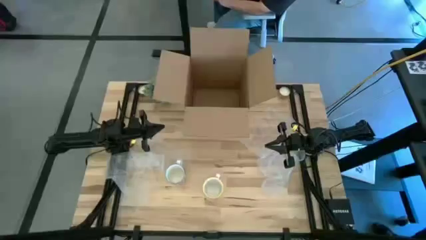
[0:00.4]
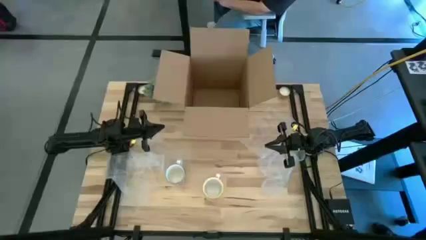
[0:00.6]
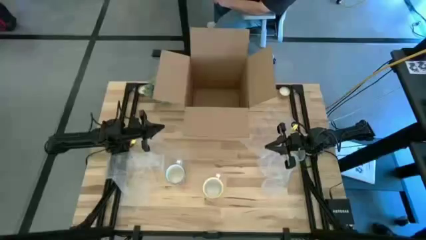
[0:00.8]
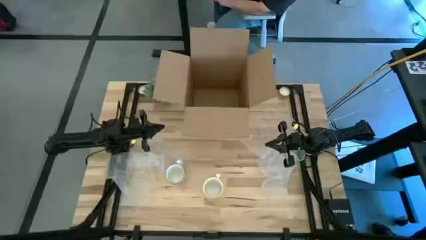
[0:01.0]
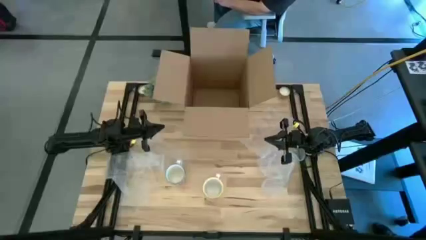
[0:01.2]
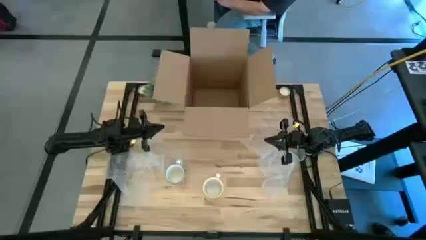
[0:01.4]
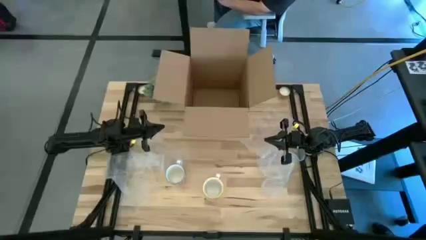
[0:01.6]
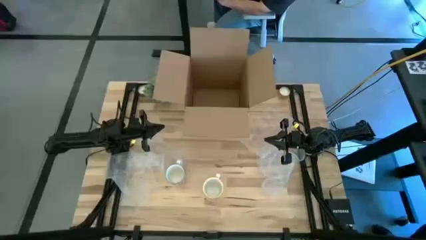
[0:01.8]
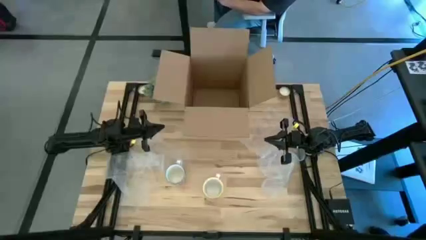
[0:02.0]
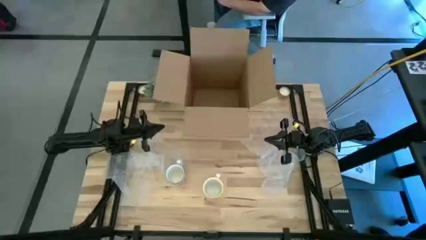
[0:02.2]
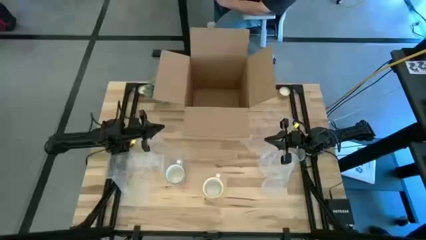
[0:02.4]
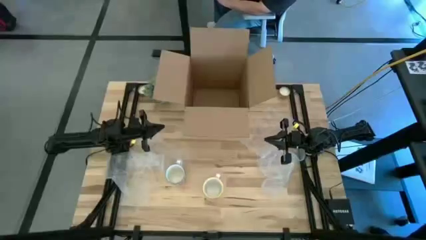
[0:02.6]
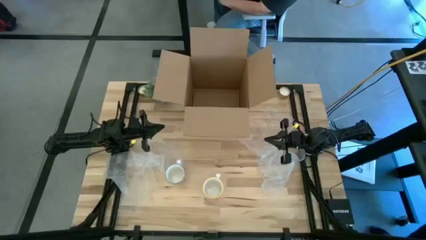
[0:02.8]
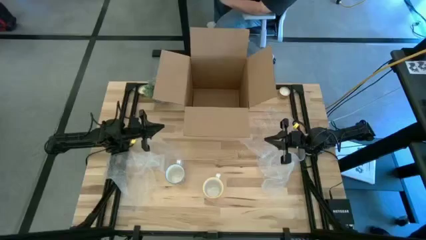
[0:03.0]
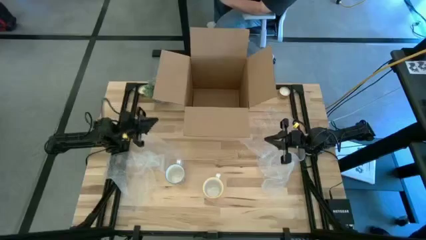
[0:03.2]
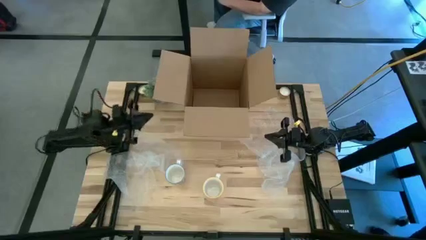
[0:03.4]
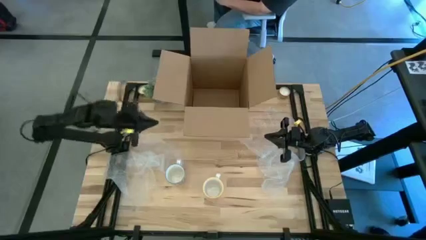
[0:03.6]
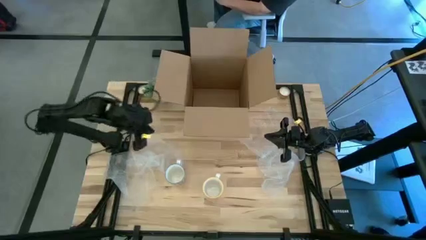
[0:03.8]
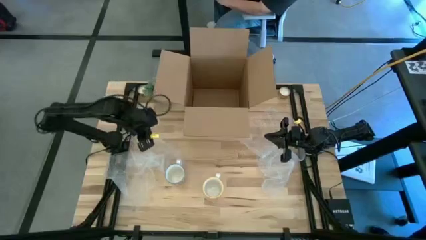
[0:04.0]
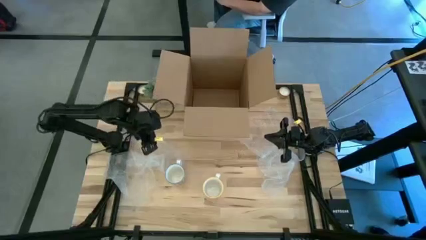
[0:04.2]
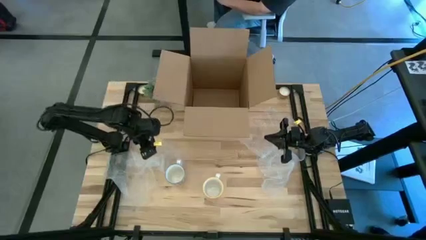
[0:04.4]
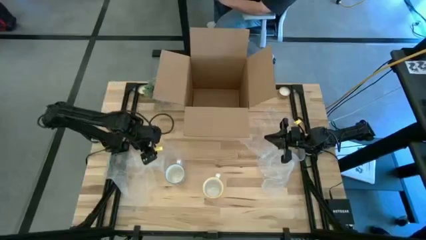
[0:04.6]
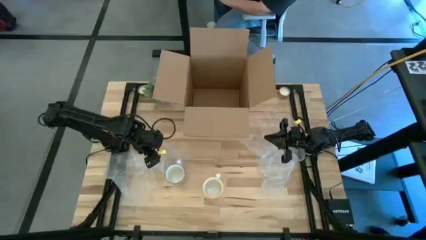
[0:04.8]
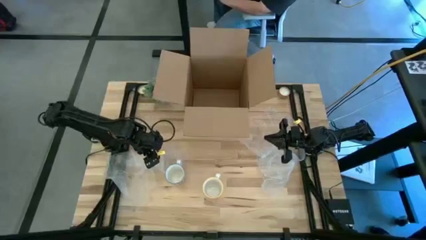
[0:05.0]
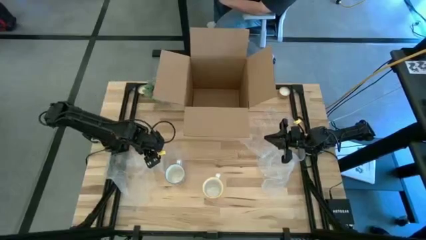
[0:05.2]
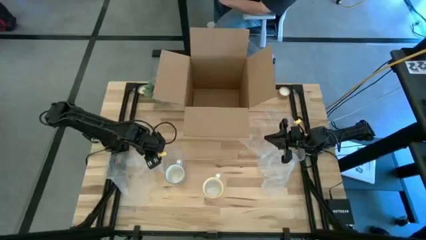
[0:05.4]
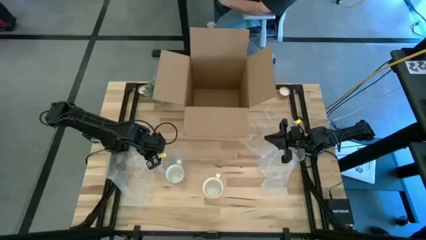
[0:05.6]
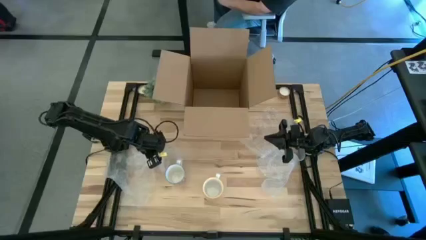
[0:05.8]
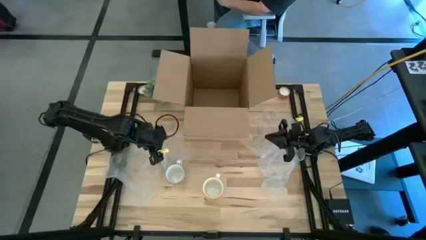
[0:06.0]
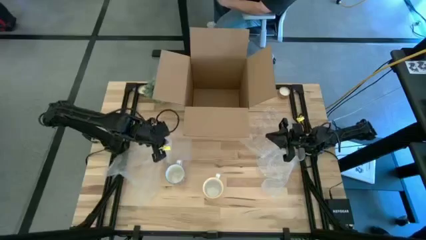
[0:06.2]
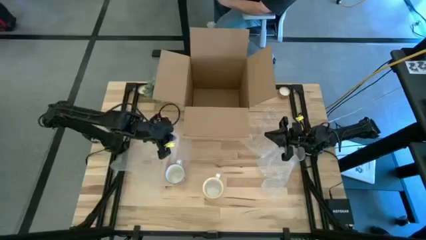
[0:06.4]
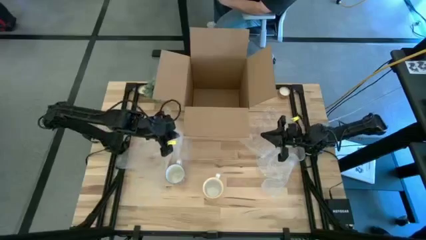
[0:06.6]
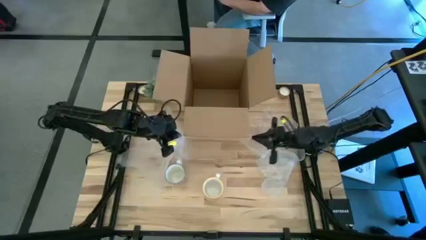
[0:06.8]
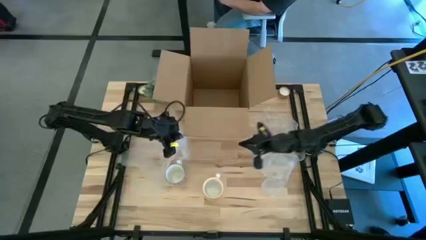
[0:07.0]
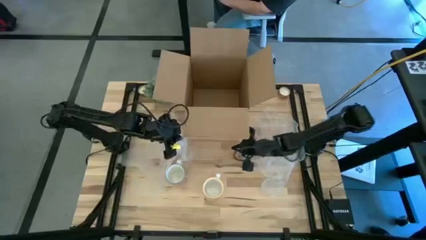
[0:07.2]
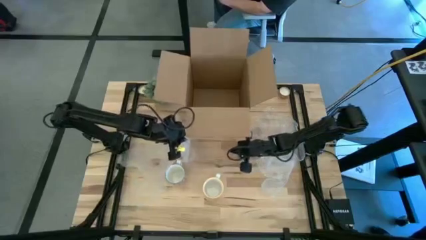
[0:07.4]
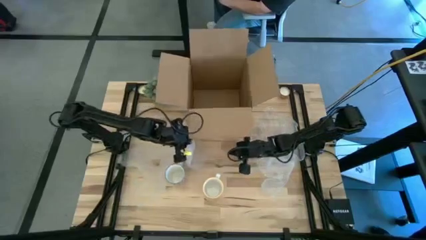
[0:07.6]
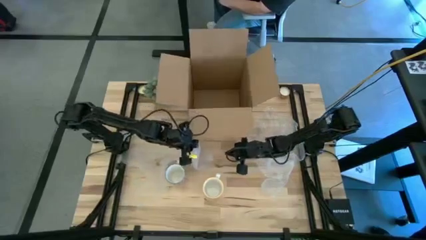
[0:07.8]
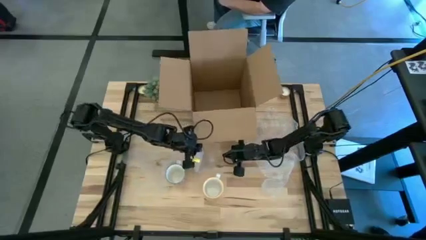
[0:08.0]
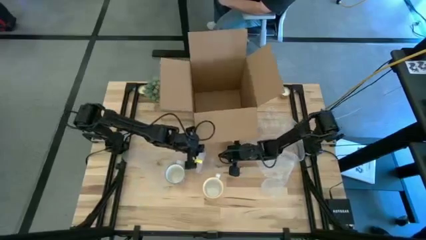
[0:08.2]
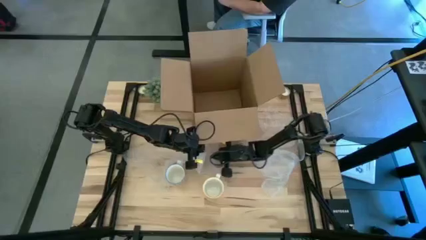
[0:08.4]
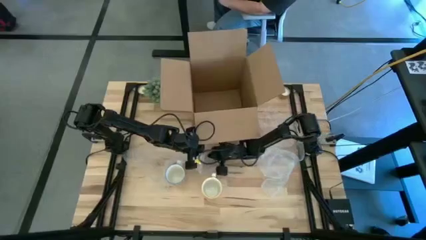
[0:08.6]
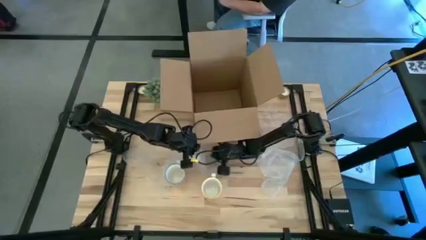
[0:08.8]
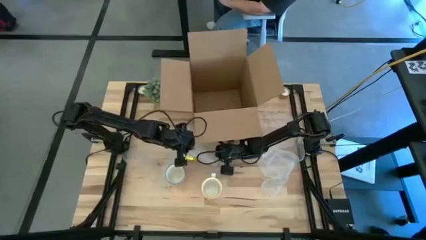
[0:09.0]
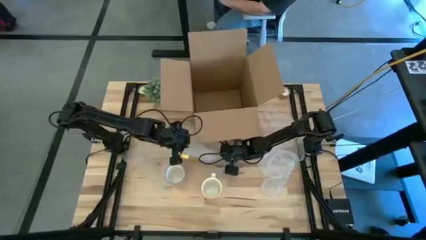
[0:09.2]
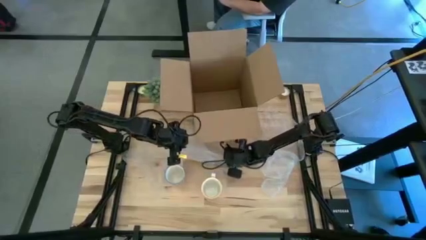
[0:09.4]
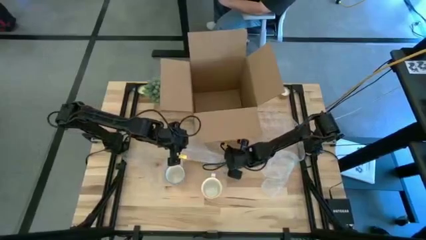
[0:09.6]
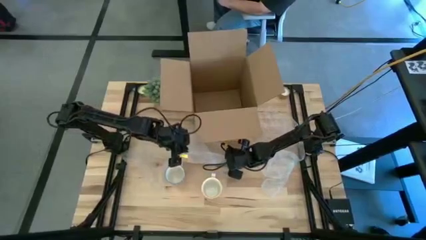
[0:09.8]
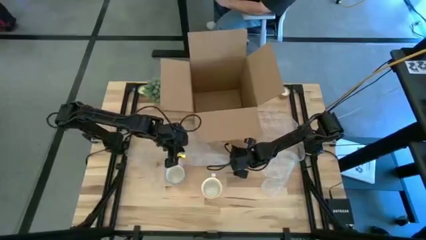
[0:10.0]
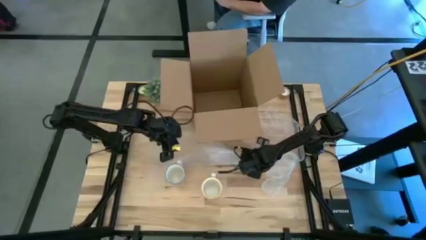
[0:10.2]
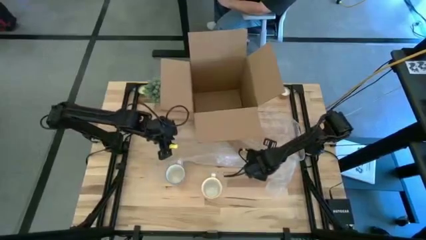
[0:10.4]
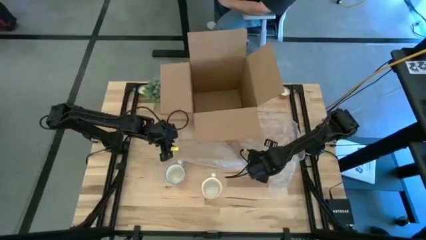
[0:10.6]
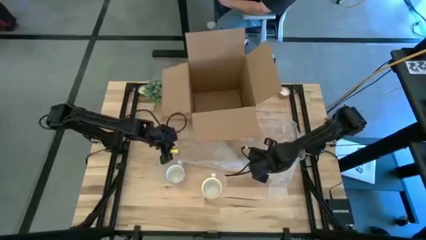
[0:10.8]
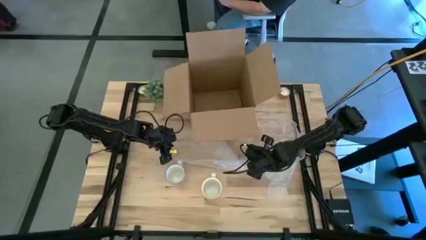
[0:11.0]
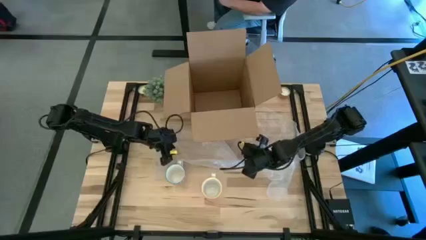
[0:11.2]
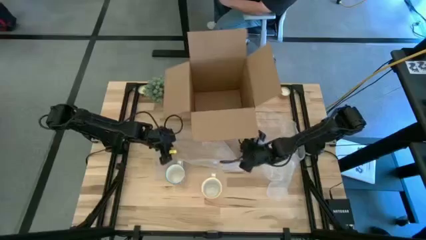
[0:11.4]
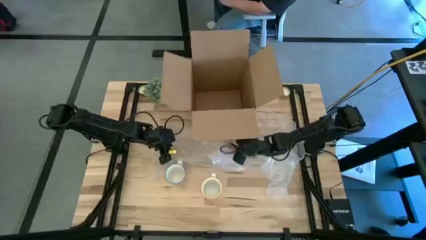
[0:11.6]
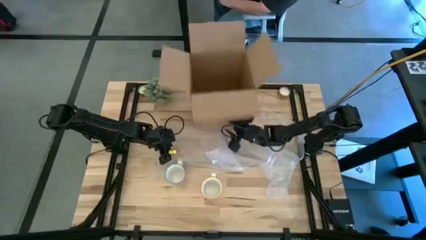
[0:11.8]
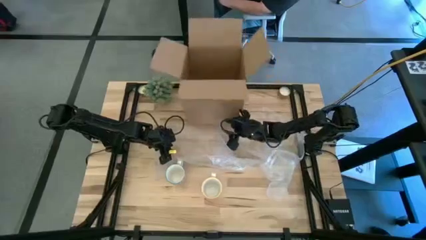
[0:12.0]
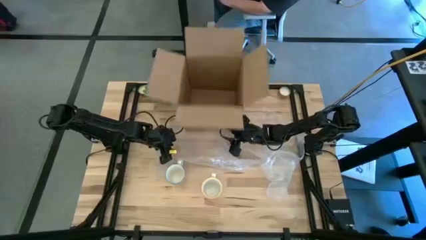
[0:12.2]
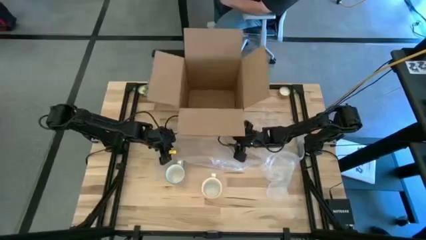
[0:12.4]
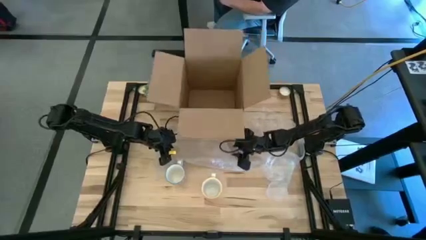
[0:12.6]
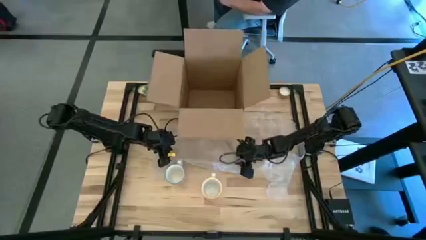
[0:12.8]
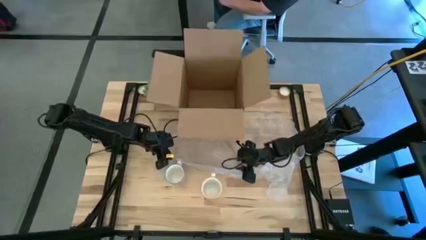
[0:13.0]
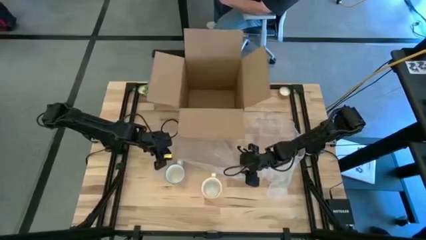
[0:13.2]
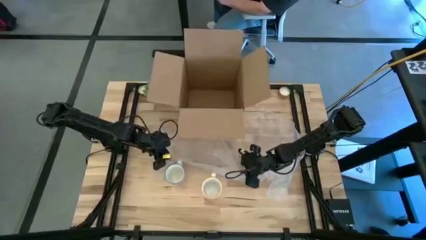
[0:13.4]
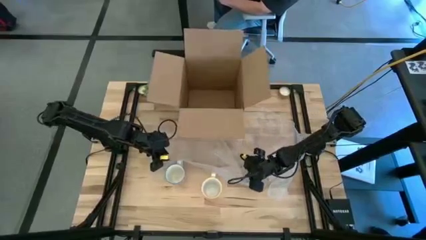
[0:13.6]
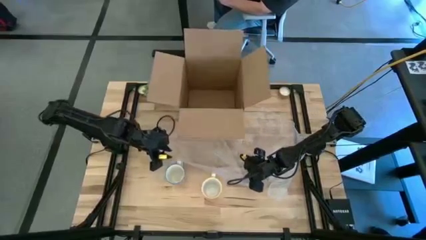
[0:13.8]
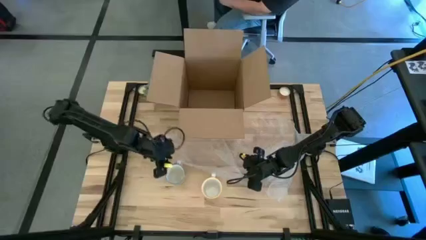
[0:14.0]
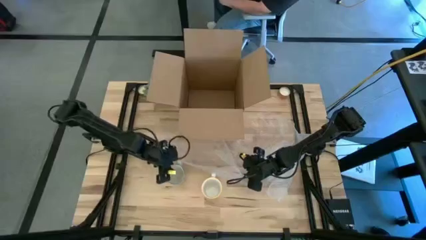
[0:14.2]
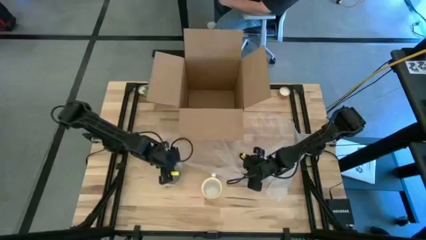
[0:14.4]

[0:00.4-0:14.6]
Task: wrap mug
Prepare the bubble wrap

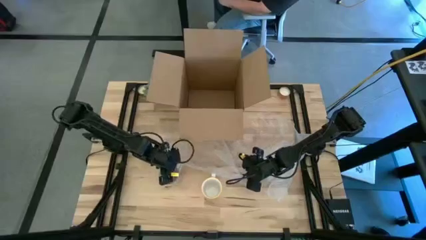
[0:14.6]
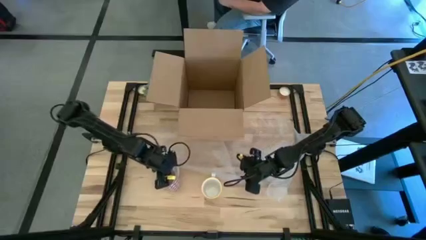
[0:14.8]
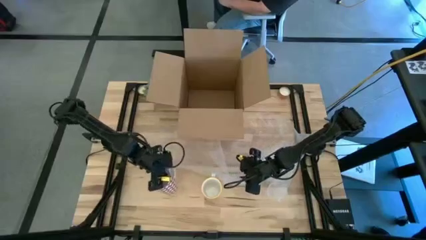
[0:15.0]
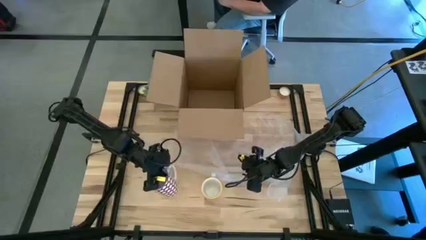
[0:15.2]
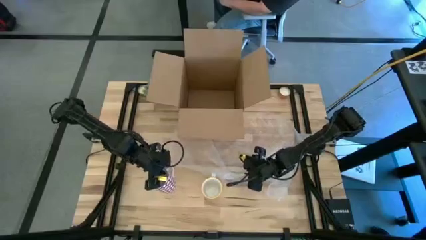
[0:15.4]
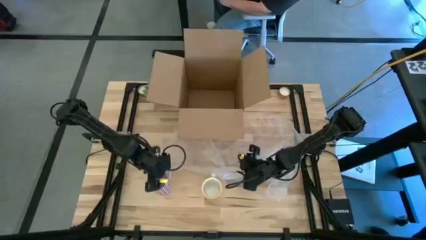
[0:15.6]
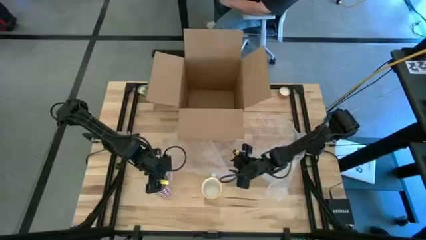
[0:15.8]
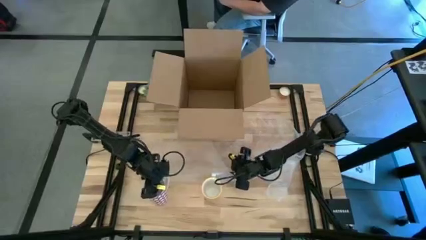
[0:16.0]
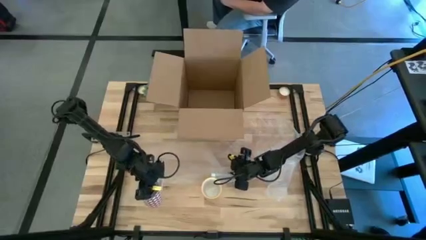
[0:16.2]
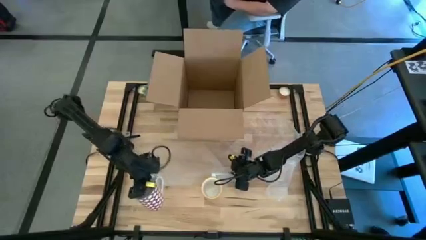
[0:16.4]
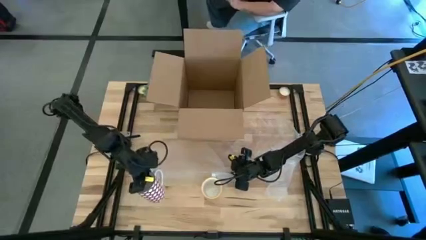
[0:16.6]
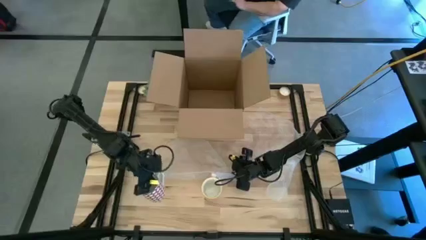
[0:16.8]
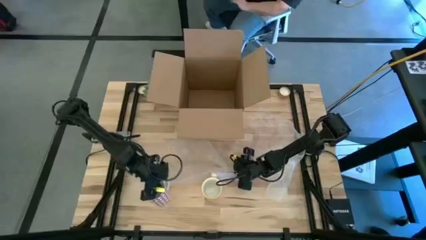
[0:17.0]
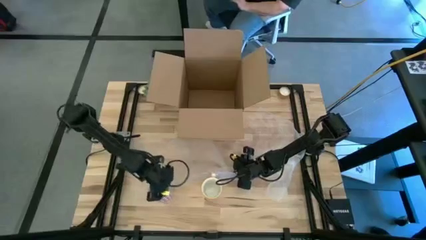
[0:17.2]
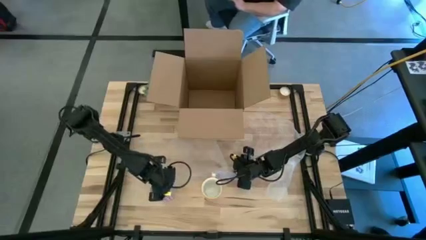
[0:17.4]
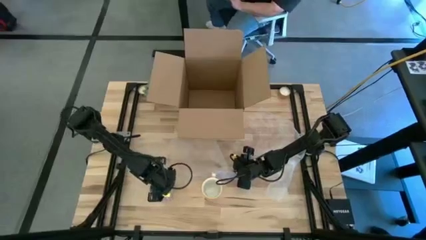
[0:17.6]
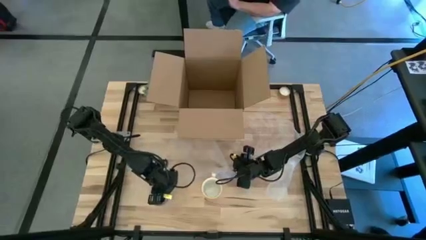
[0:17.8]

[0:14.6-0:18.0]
Put the red mug on the bubble wrap
